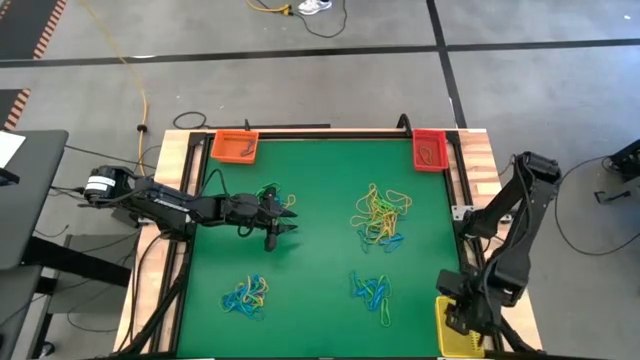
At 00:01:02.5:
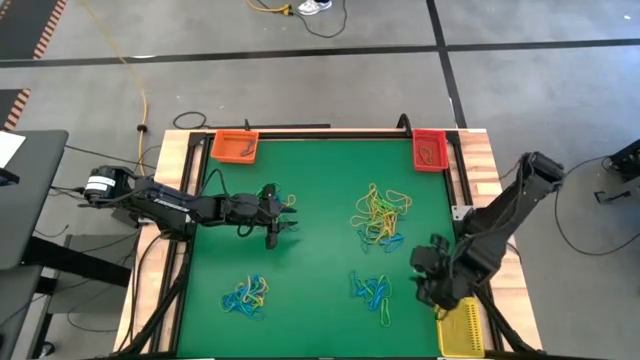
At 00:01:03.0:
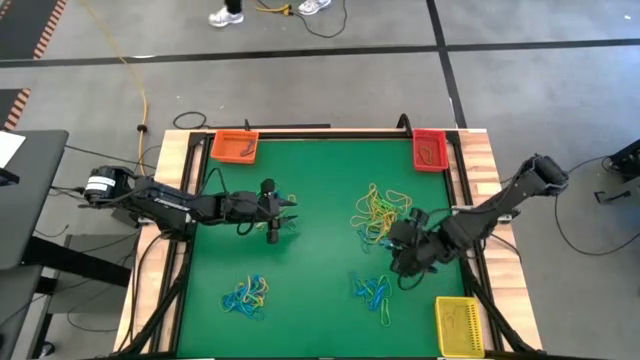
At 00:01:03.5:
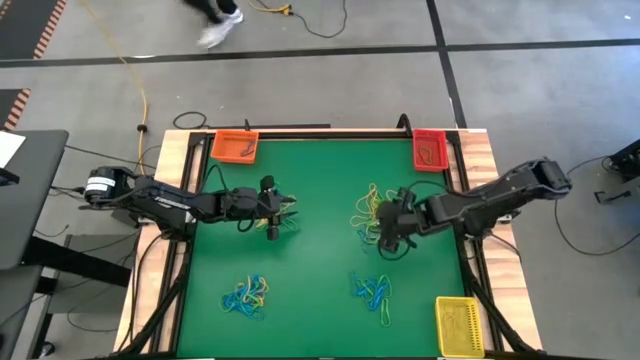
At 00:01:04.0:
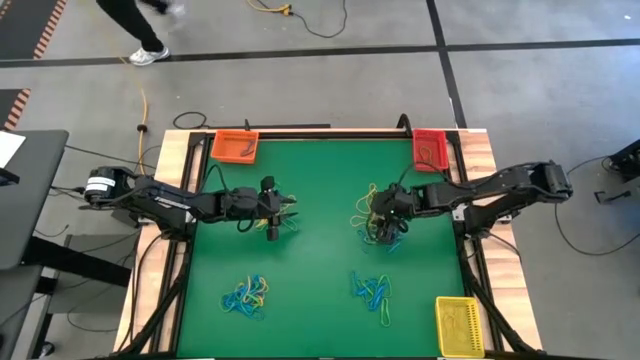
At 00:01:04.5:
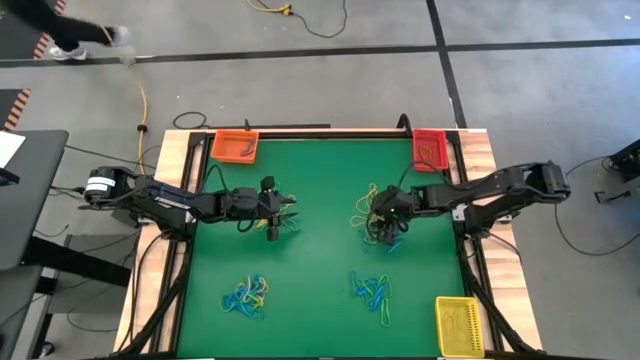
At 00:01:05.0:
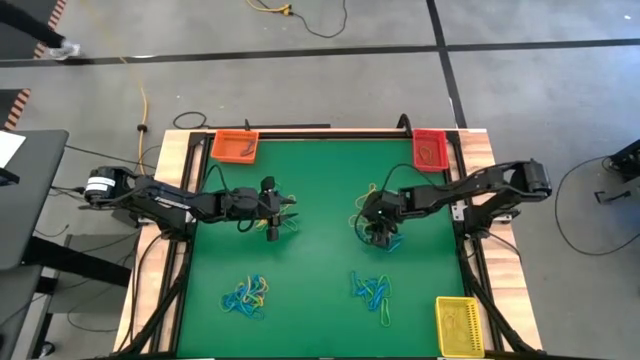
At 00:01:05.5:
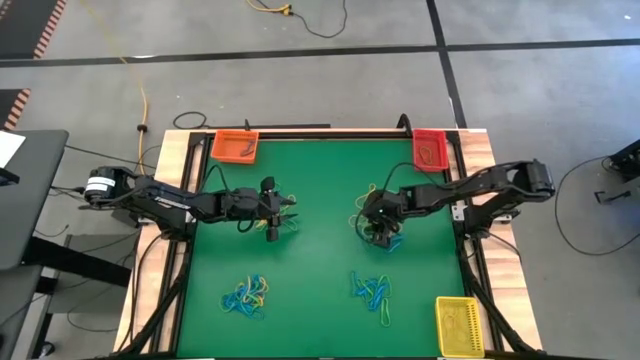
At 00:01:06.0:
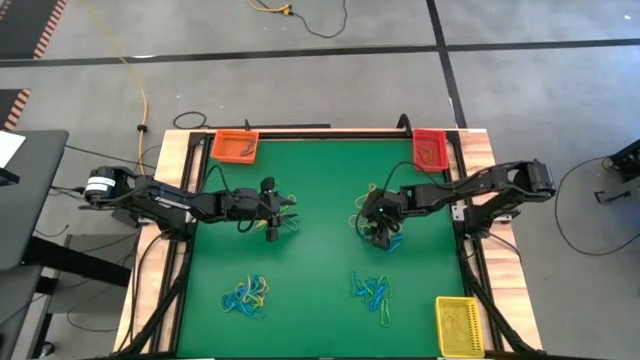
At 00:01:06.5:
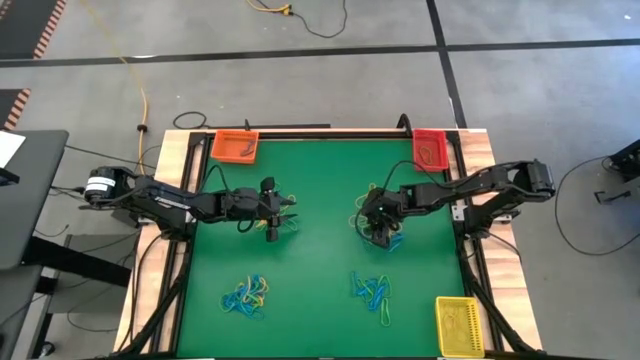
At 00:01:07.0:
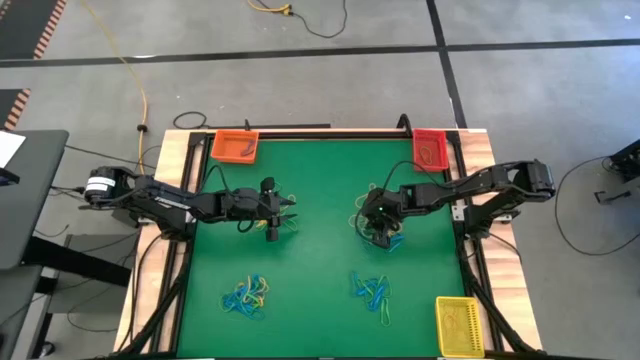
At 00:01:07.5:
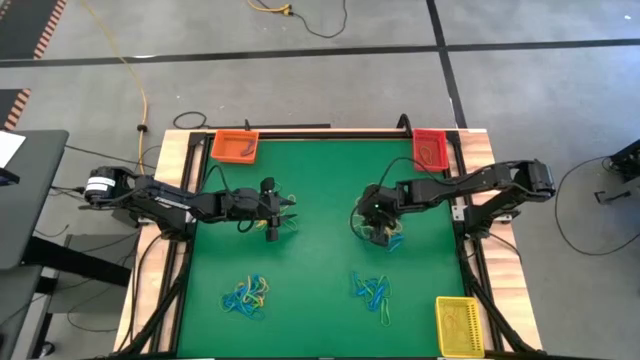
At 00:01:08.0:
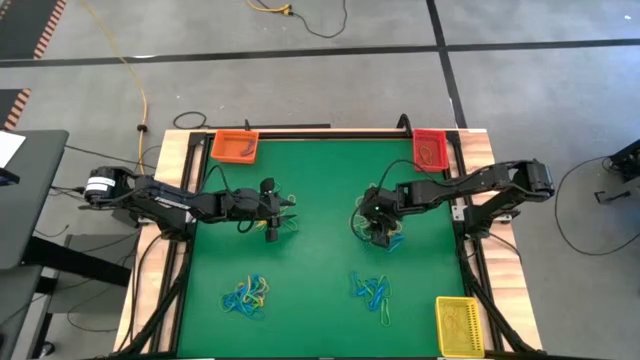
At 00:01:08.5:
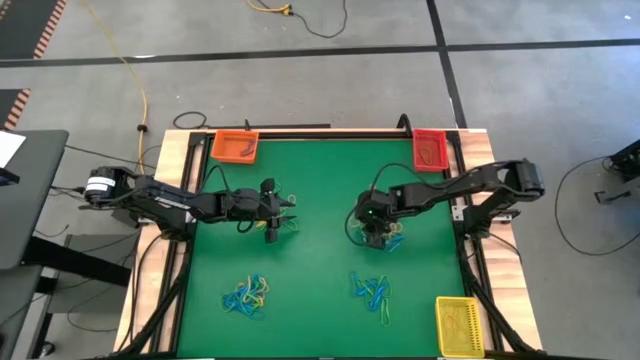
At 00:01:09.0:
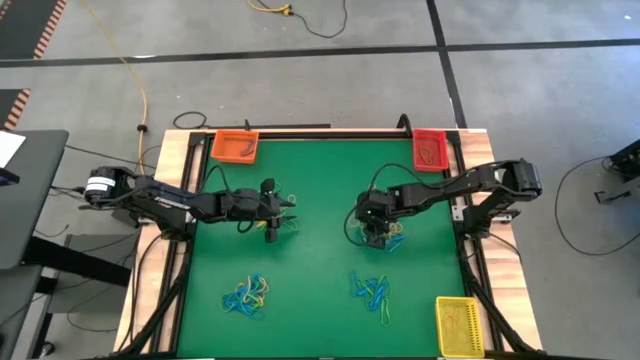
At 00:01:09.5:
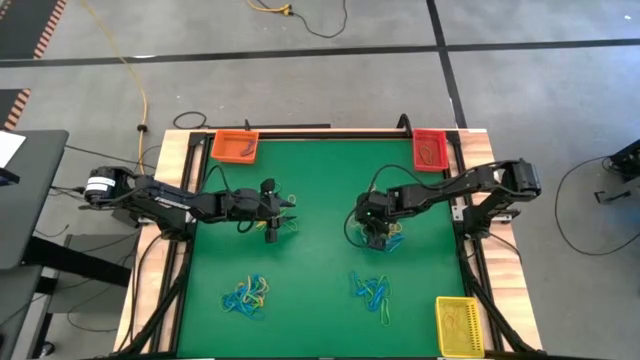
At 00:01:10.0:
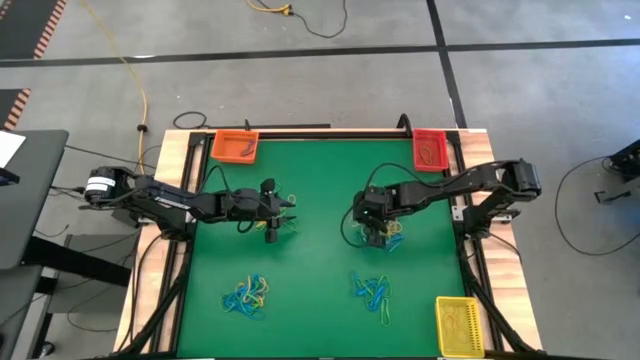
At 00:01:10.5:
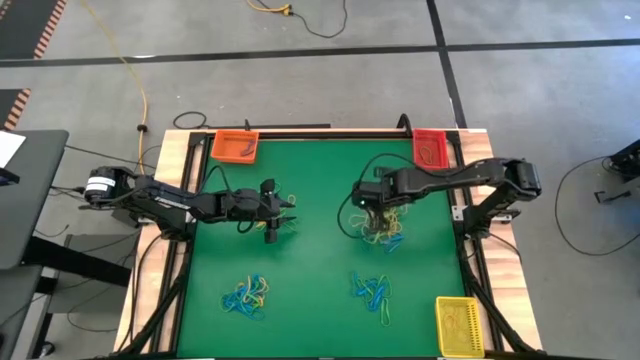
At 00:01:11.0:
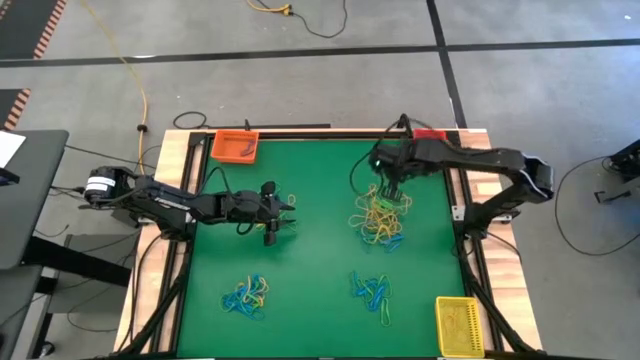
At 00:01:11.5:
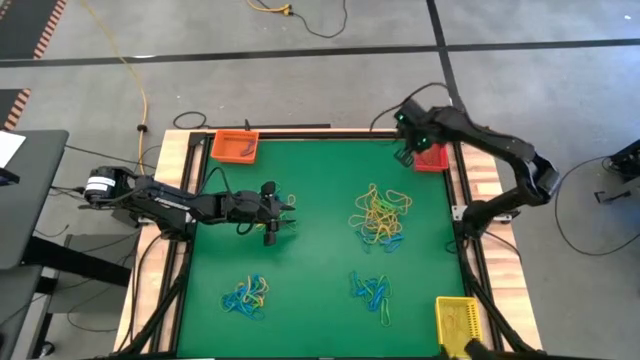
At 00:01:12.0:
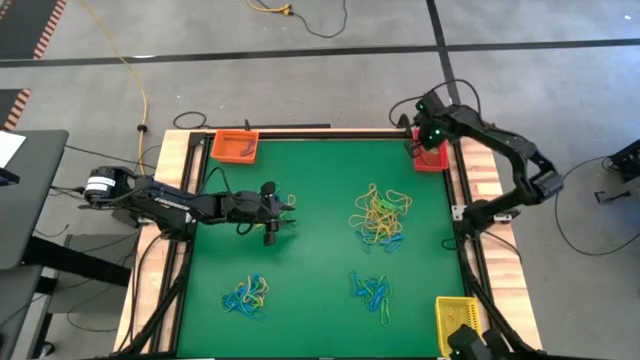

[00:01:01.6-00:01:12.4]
Task: Sort rubber bands into baskets
Put the top right green rubber band into the red bin

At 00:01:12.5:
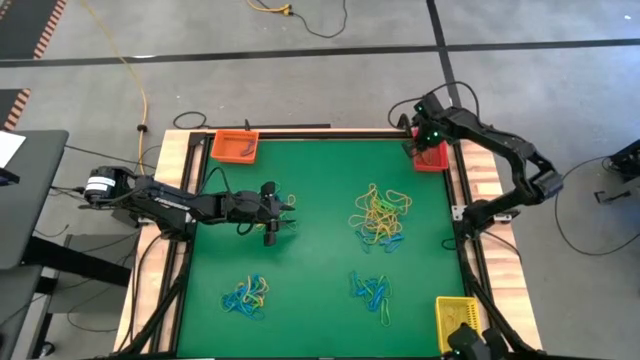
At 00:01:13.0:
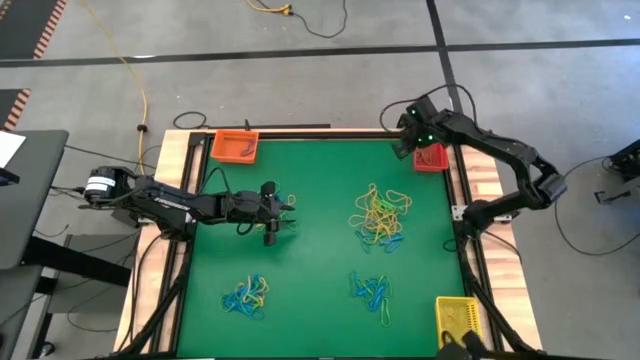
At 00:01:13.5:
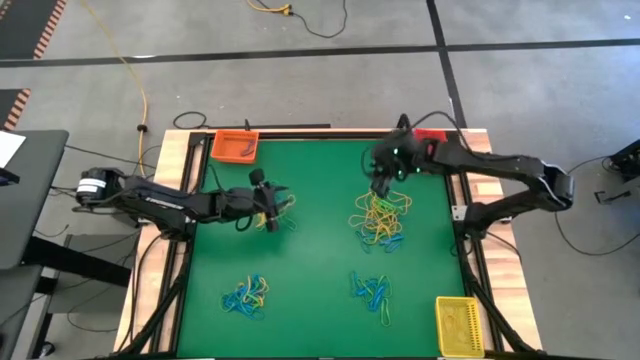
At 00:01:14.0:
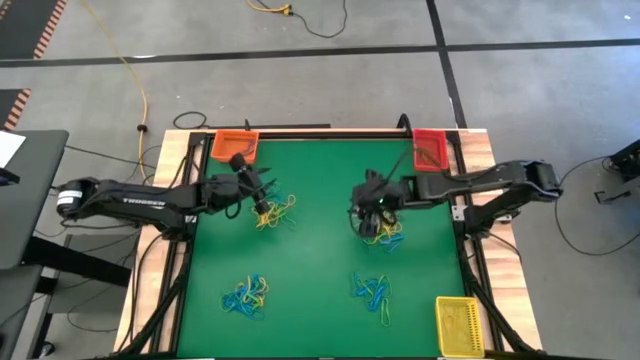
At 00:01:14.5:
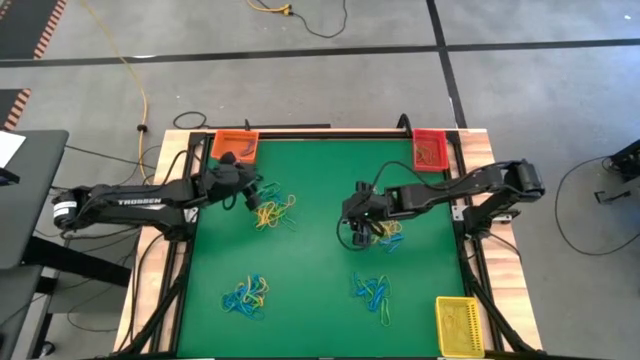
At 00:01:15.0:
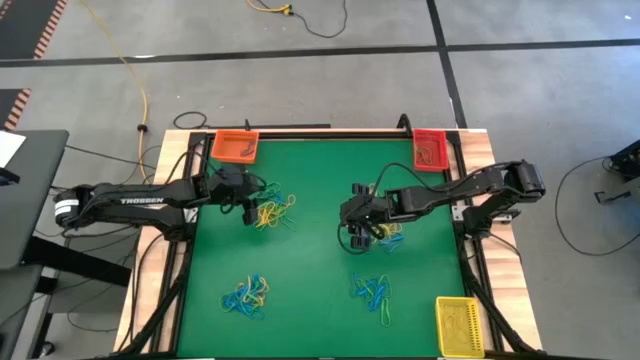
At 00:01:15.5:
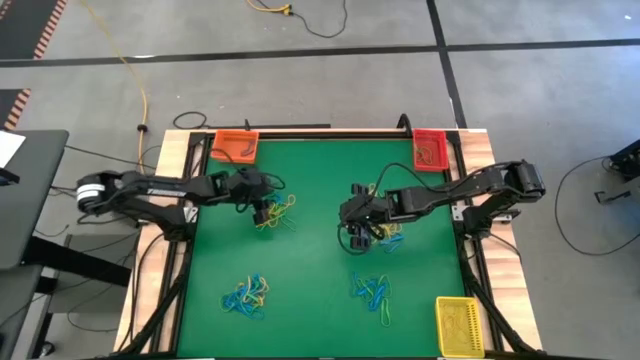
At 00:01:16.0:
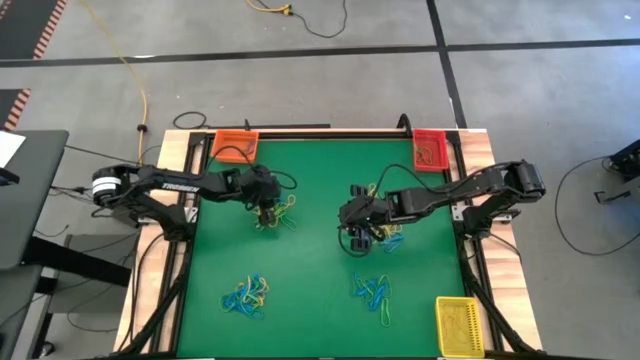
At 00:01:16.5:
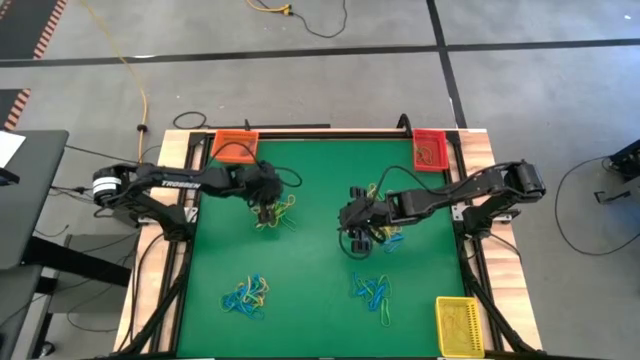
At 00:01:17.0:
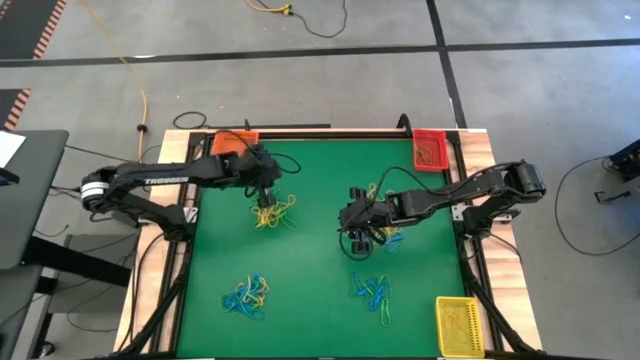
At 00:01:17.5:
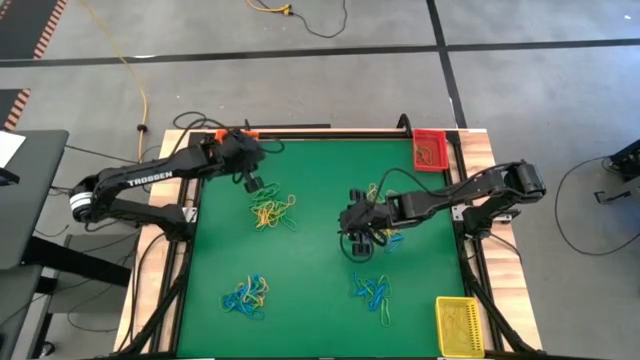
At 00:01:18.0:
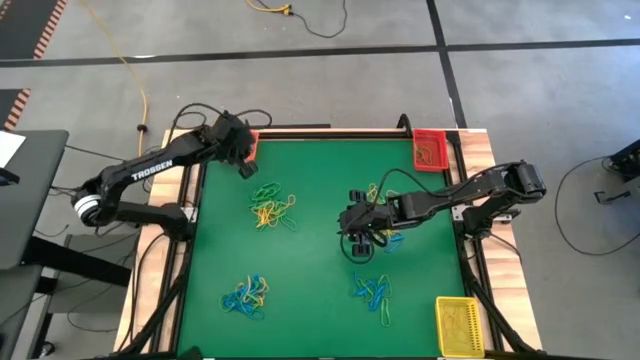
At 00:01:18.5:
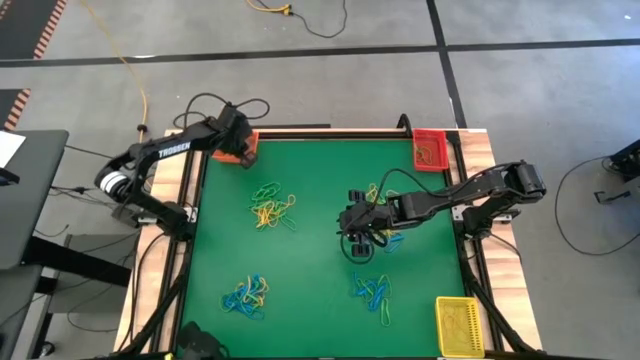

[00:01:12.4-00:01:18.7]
Put the top left blue rubber band into the orange bin
